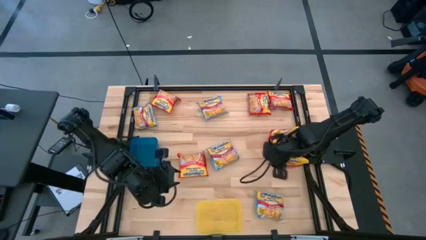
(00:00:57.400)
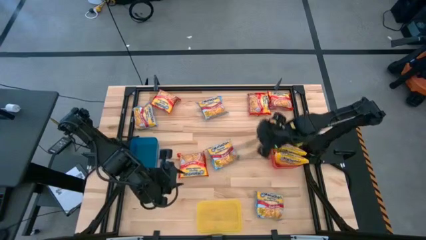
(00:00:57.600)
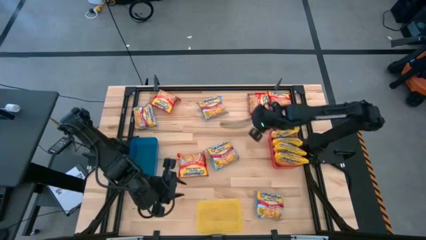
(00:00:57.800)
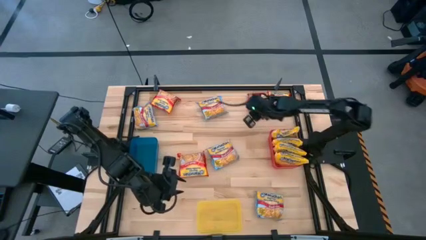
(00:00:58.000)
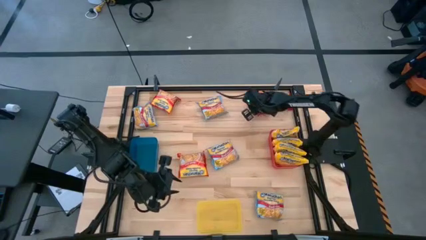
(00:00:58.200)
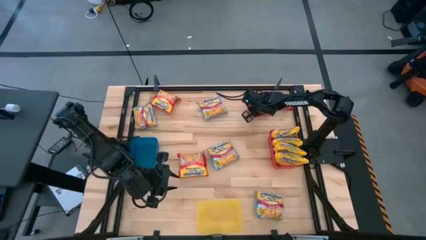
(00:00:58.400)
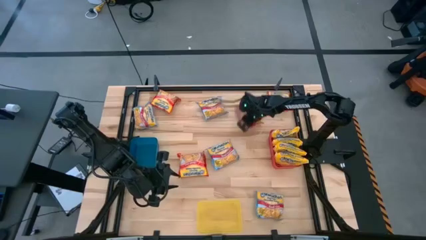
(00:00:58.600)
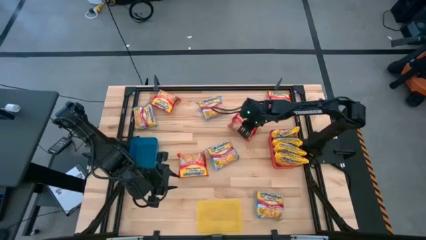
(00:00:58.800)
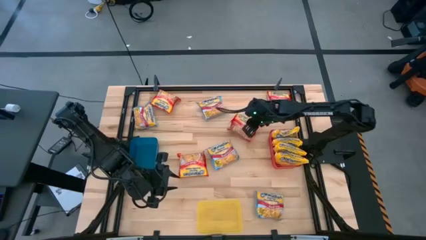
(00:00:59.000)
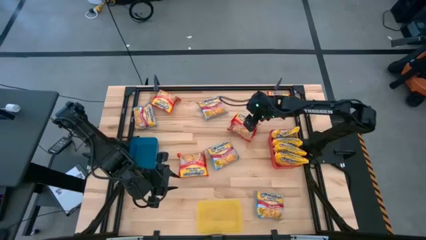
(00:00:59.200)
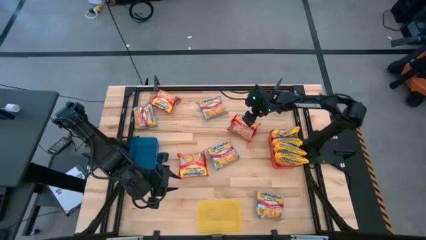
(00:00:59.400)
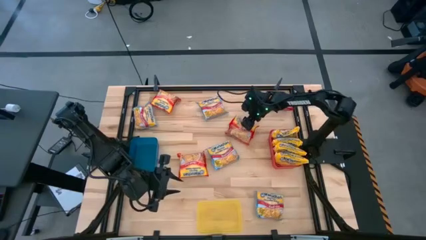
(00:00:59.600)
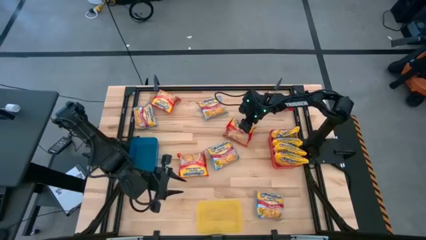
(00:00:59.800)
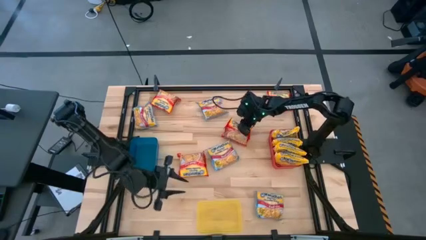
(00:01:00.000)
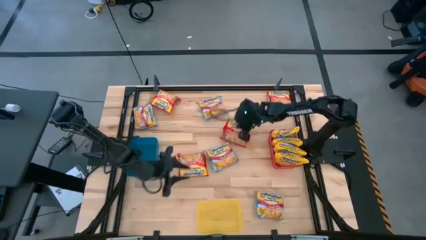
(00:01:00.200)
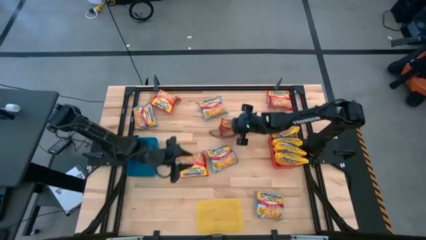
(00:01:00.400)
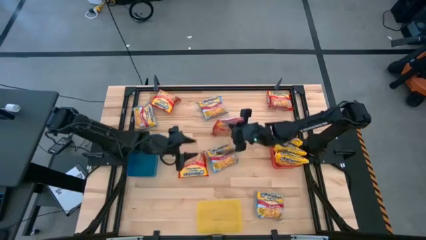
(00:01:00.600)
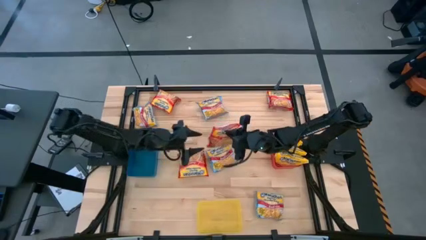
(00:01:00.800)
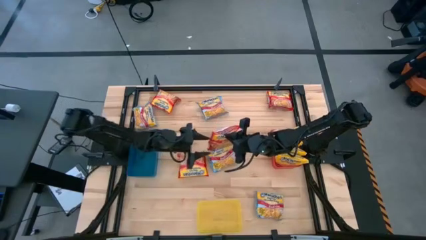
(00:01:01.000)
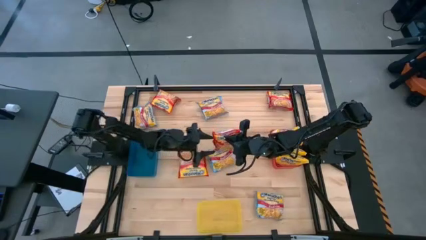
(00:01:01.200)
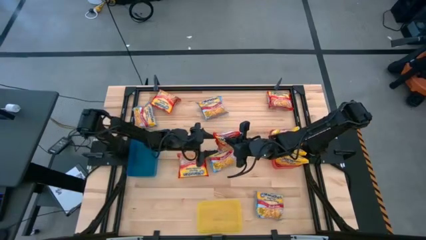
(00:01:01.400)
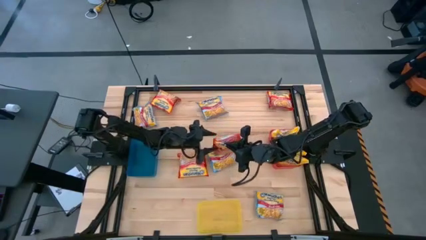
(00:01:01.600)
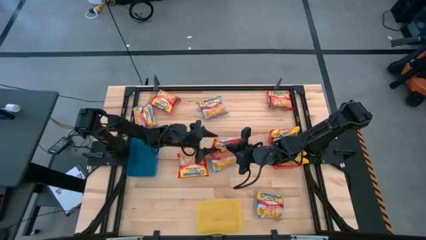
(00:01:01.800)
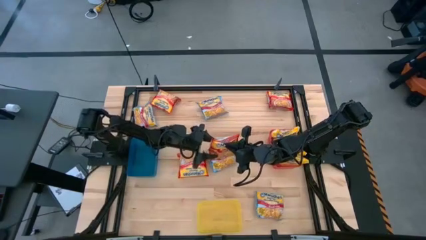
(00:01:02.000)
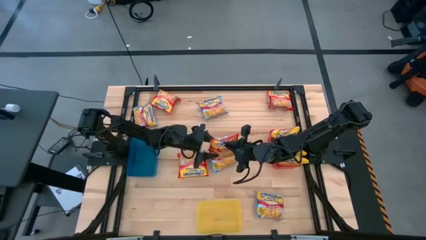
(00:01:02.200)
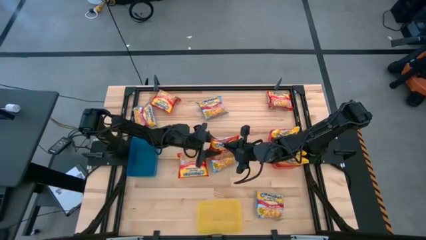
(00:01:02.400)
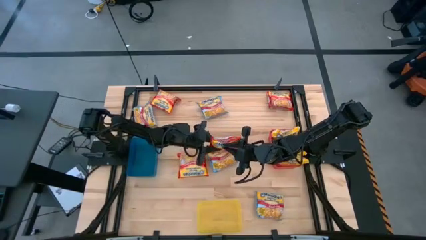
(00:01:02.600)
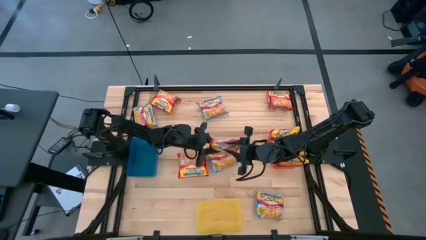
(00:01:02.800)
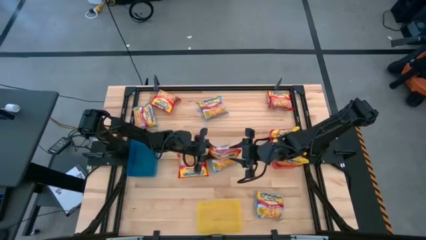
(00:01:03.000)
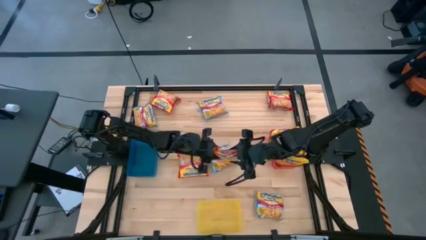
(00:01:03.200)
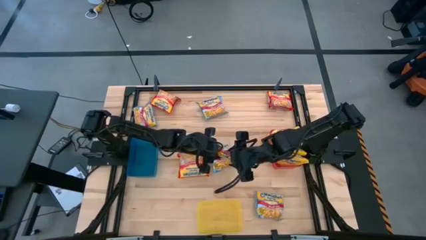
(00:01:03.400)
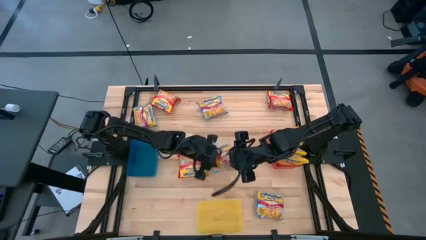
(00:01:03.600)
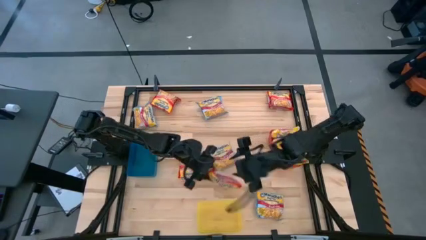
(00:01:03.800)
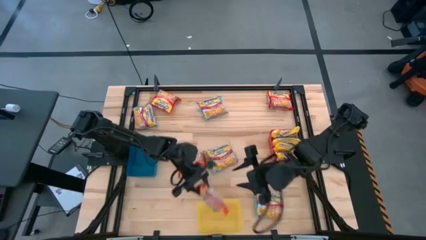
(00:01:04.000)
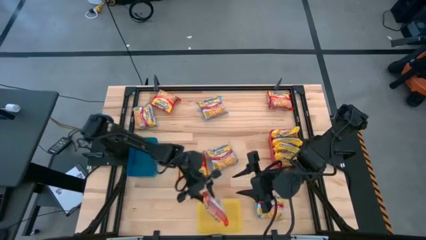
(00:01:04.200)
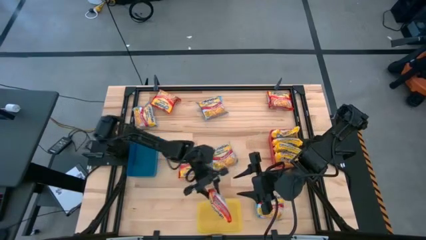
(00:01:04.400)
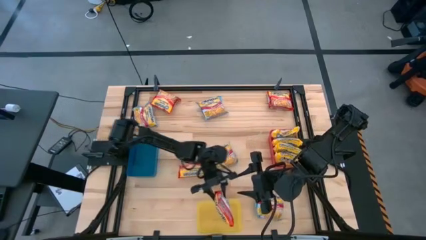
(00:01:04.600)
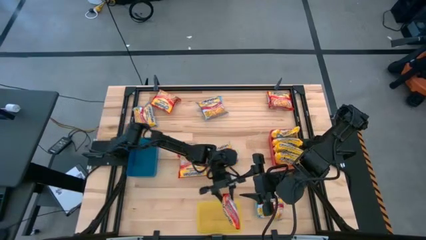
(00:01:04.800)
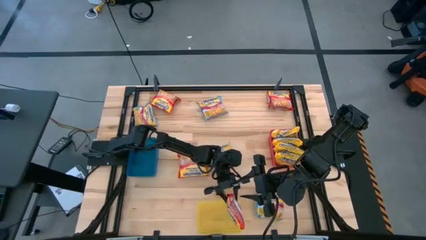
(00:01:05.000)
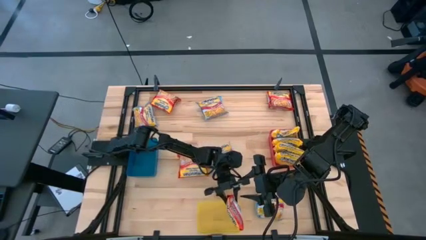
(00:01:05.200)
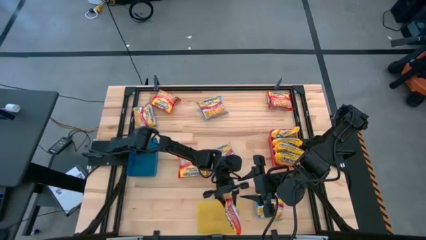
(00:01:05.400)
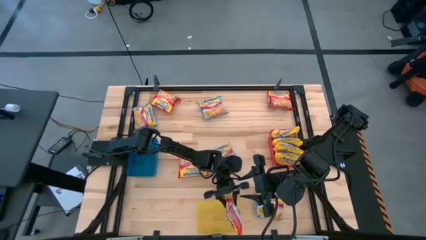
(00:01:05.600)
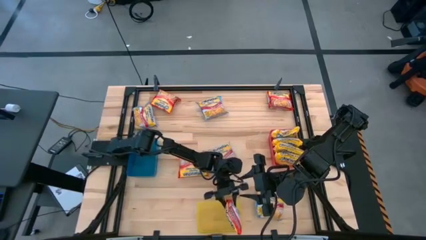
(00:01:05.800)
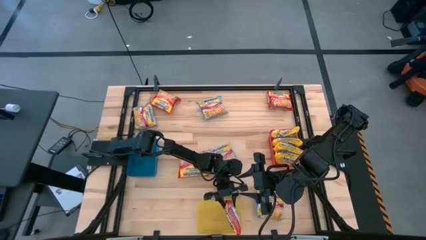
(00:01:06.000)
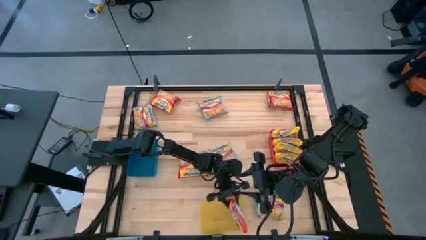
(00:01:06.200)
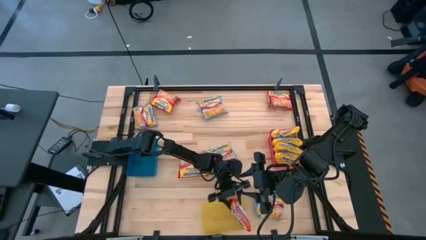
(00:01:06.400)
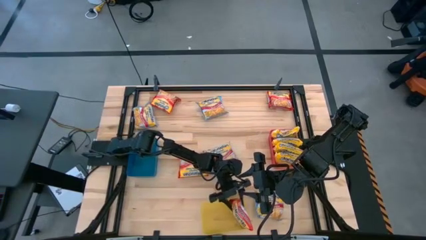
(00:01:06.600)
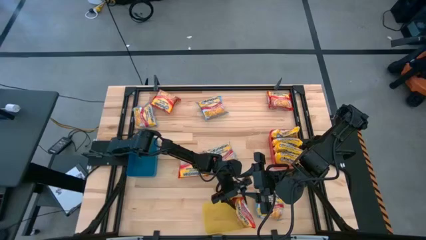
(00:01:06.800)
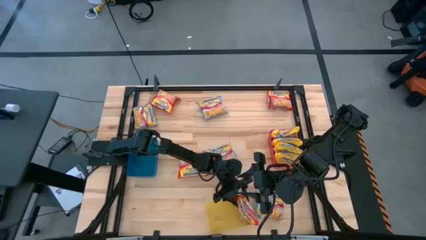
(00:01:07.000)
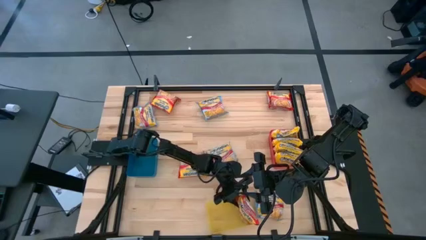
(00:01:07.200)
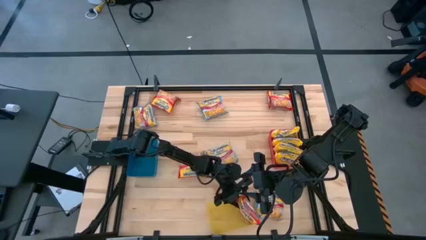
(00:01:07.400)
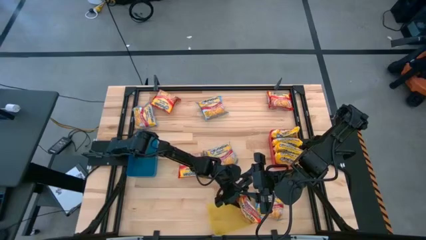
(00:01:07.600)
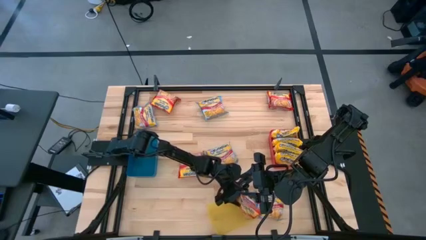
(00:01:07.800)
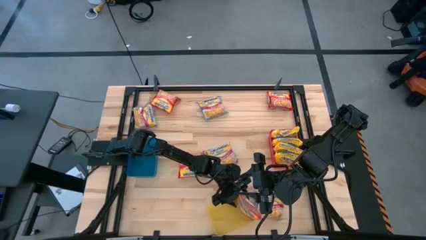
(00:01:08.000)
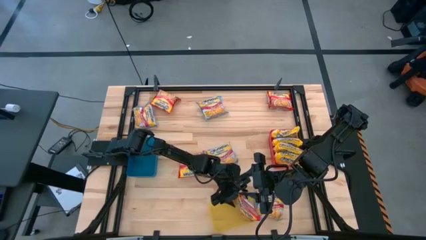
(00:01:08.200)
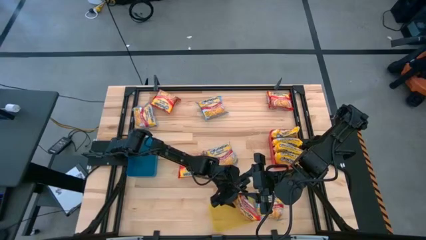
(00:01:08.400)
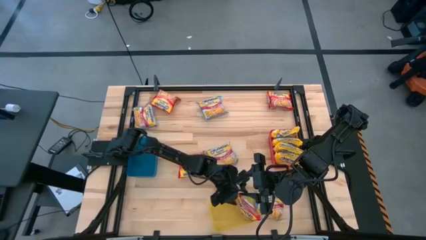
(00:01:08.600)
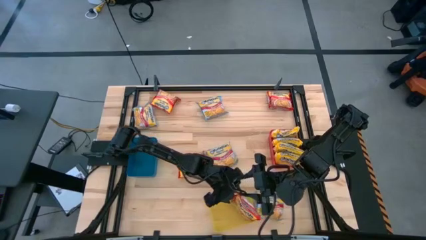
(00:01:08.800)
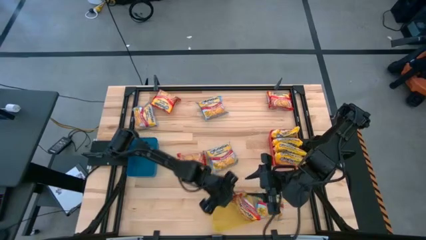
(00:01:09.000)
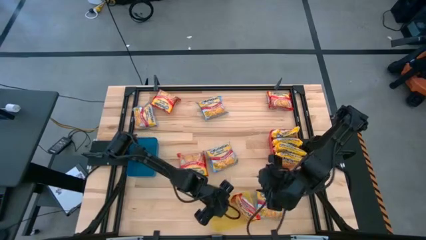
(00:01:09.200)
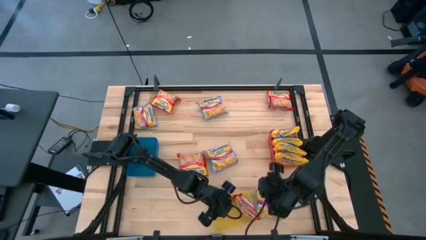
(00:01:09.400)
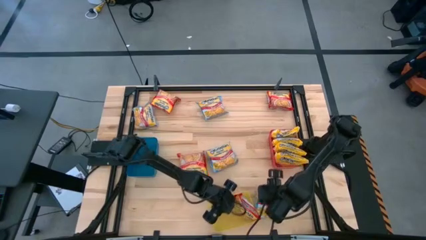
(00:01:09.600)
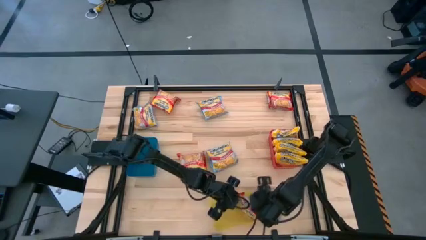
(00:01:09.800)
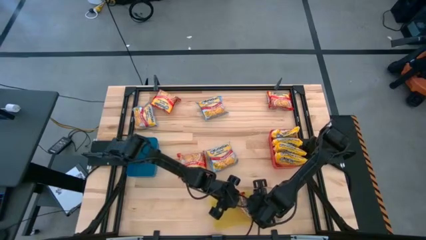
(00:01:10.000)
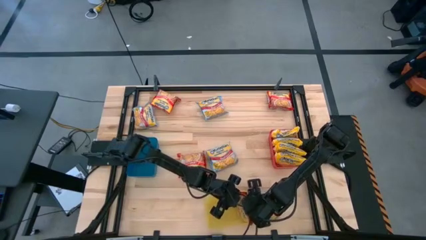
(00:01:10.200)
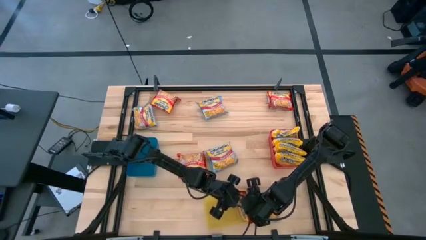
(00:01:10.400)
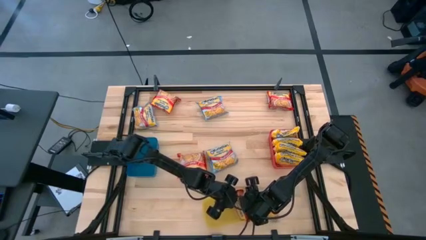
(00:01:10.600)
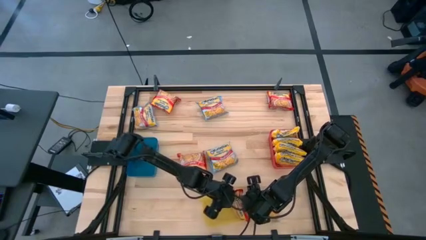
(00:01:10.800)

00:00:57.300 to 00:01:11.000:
Task: Sort Maruchan noodles
Put the red noodle pack into the yellow bin
